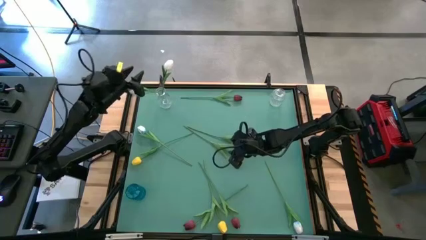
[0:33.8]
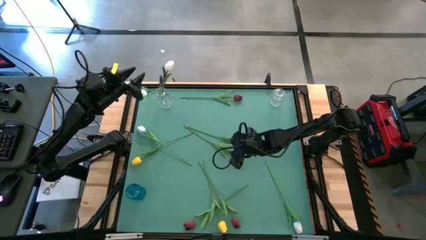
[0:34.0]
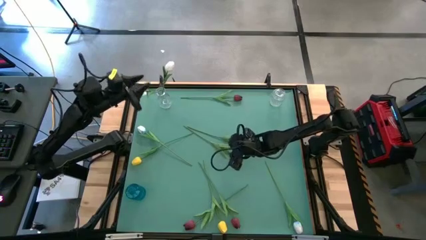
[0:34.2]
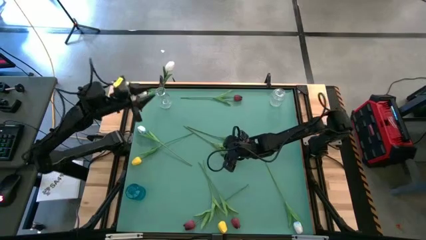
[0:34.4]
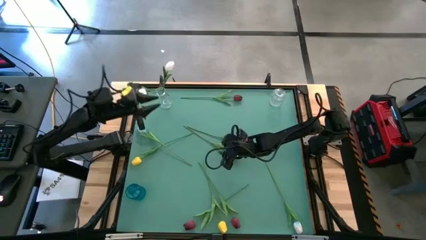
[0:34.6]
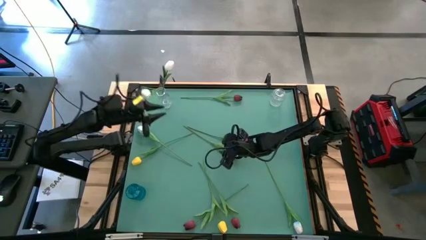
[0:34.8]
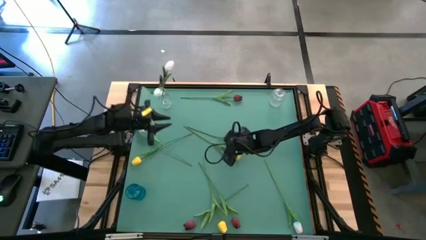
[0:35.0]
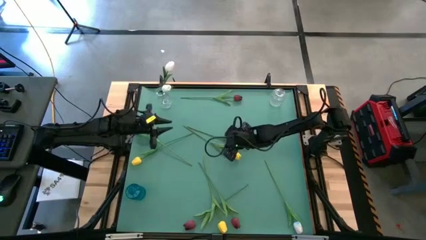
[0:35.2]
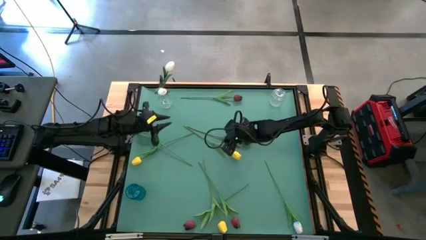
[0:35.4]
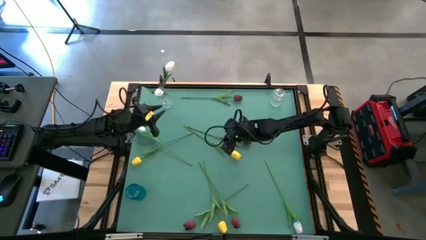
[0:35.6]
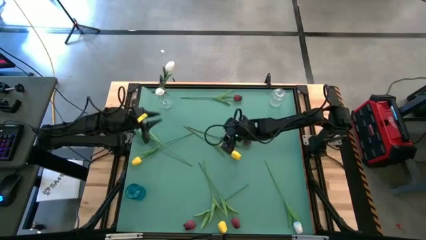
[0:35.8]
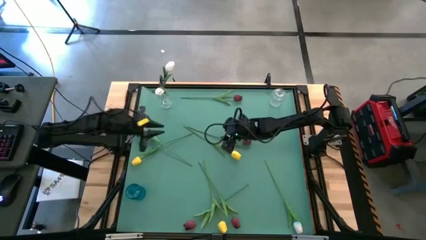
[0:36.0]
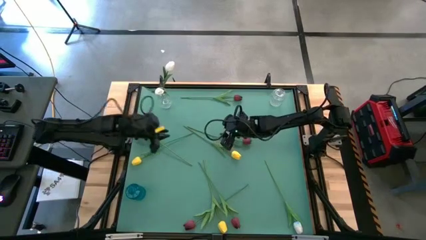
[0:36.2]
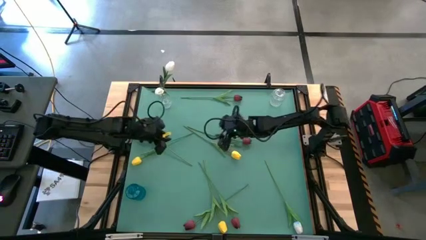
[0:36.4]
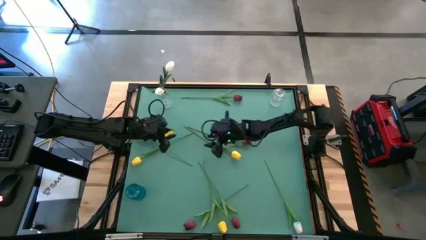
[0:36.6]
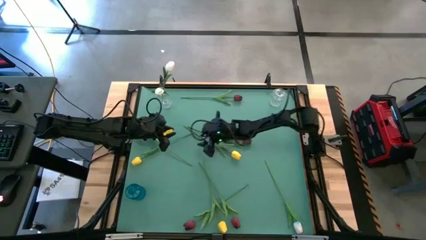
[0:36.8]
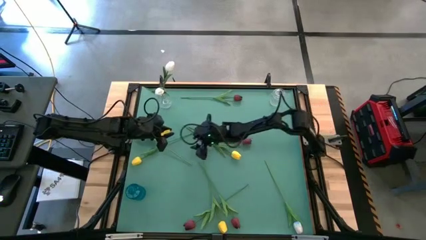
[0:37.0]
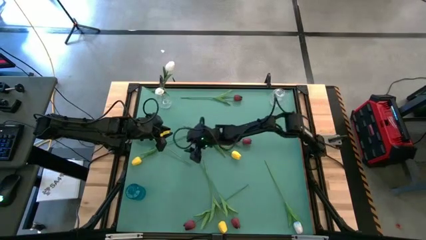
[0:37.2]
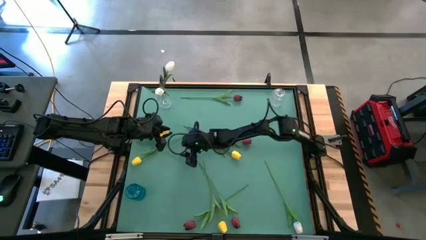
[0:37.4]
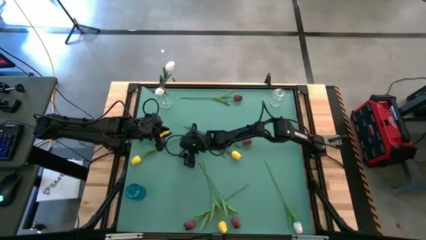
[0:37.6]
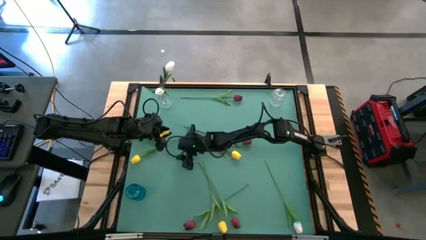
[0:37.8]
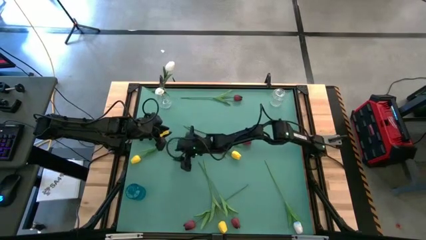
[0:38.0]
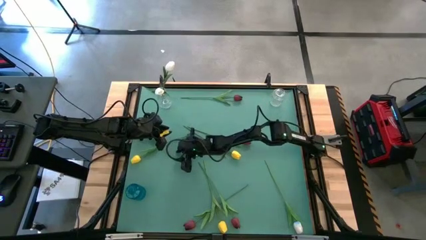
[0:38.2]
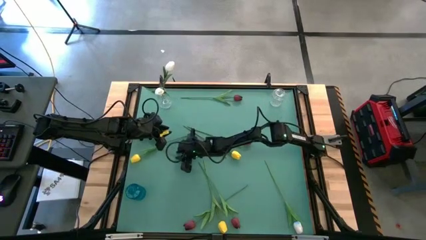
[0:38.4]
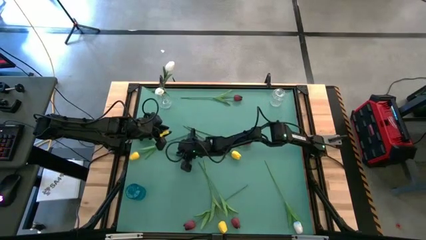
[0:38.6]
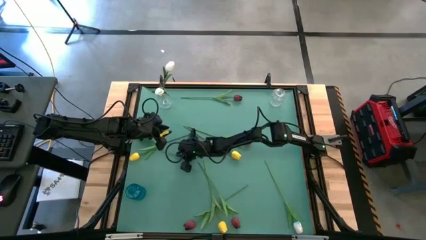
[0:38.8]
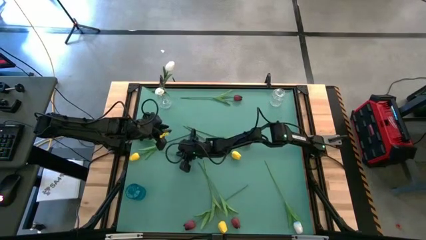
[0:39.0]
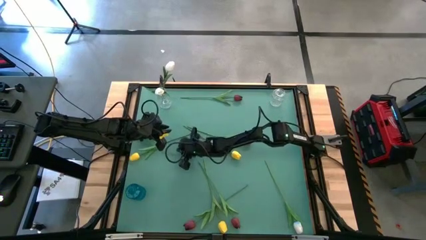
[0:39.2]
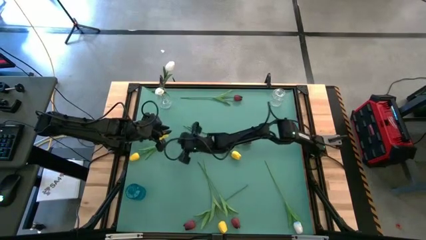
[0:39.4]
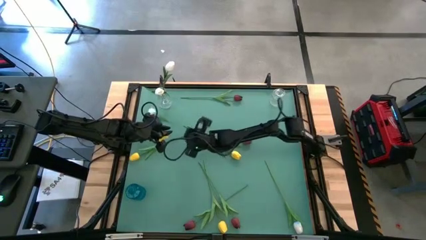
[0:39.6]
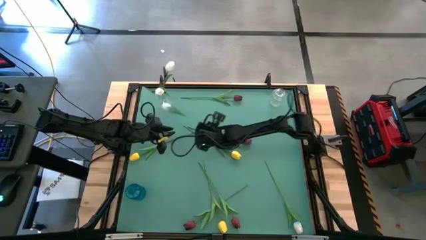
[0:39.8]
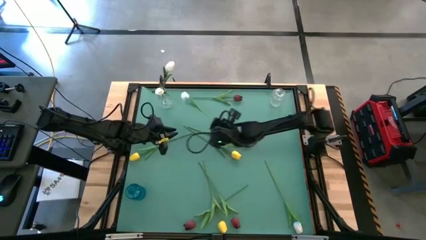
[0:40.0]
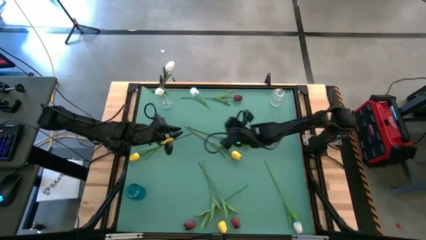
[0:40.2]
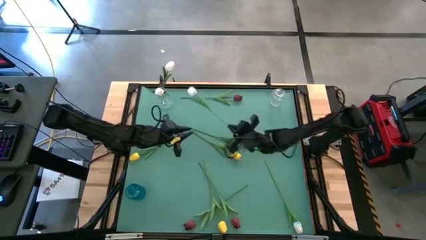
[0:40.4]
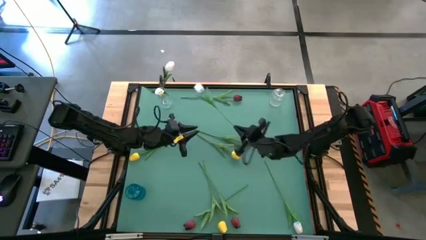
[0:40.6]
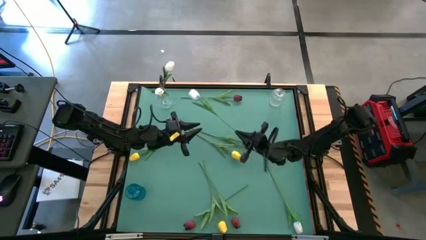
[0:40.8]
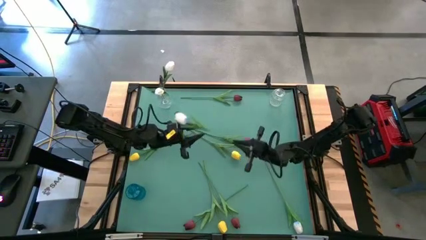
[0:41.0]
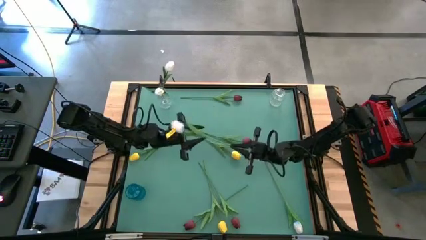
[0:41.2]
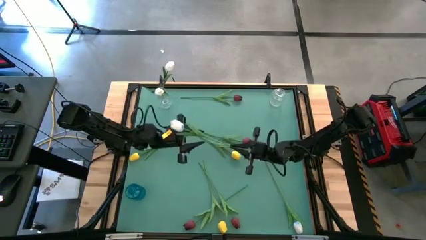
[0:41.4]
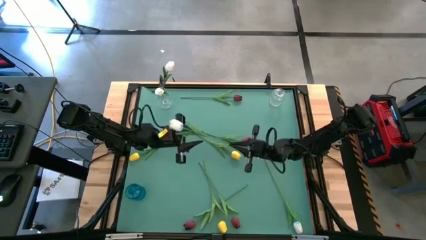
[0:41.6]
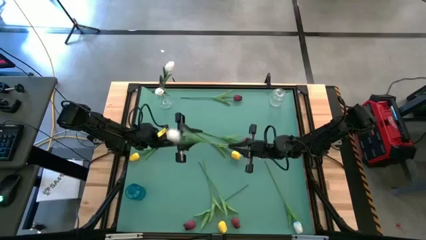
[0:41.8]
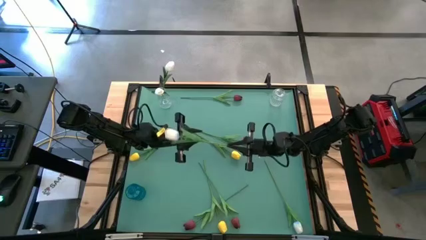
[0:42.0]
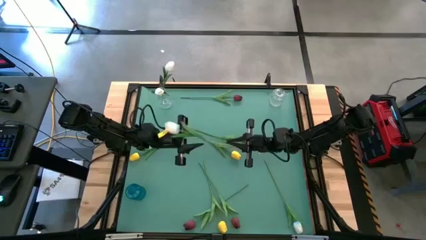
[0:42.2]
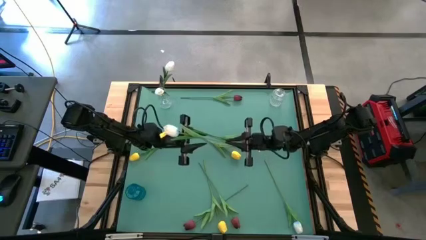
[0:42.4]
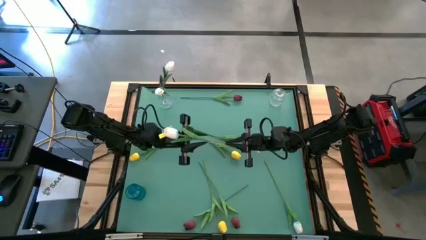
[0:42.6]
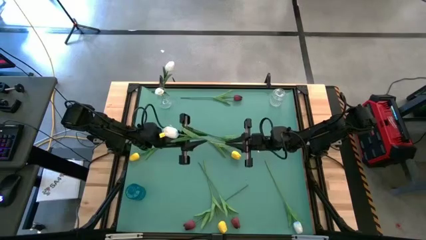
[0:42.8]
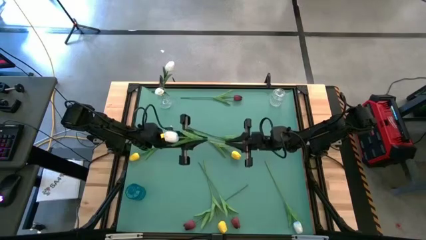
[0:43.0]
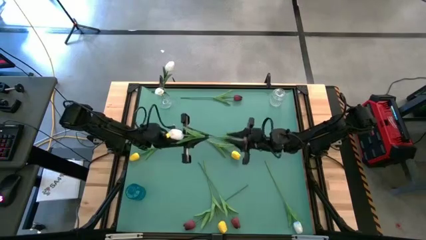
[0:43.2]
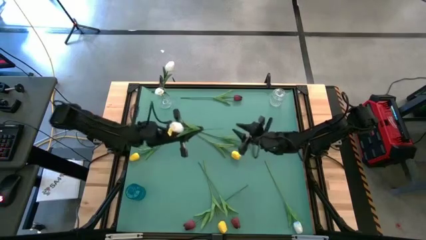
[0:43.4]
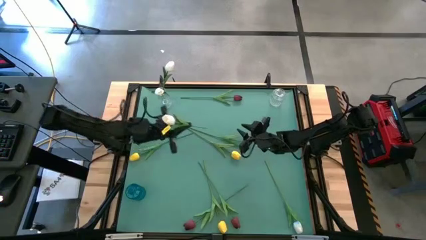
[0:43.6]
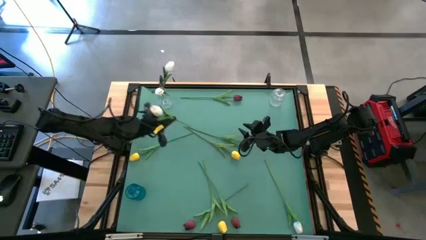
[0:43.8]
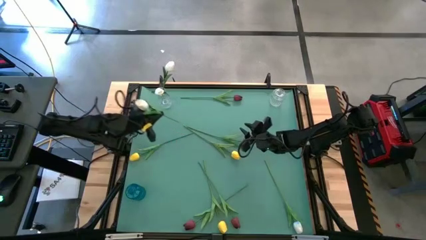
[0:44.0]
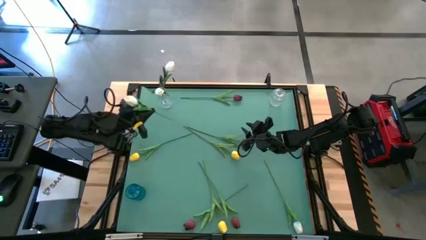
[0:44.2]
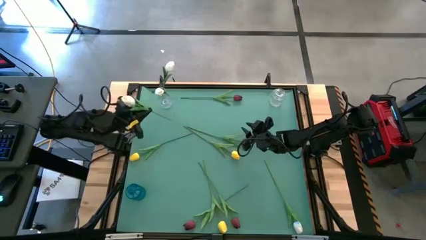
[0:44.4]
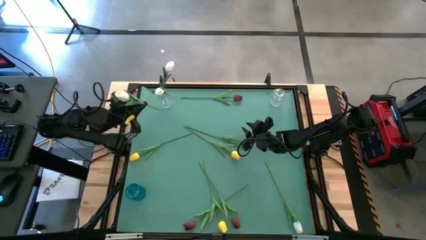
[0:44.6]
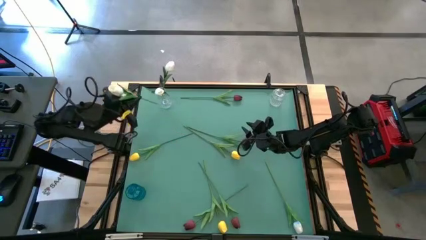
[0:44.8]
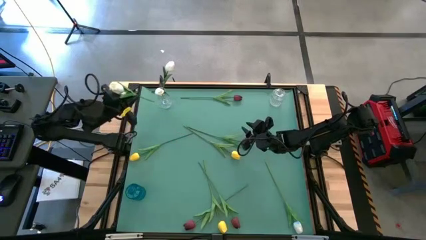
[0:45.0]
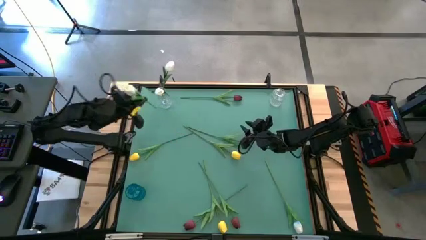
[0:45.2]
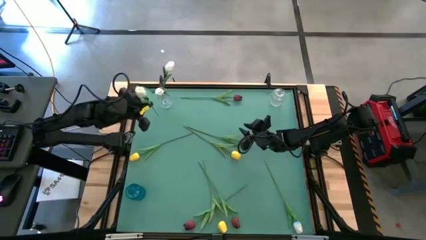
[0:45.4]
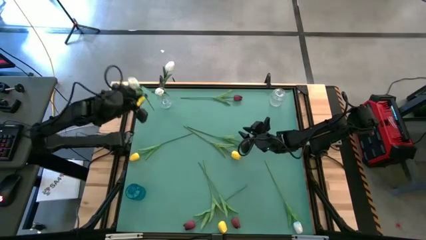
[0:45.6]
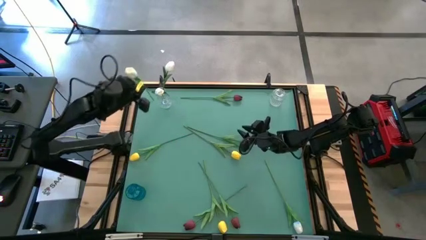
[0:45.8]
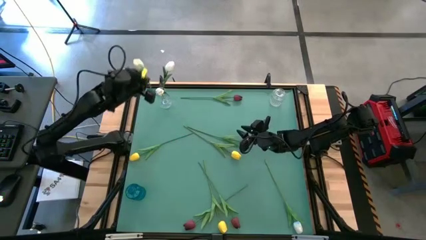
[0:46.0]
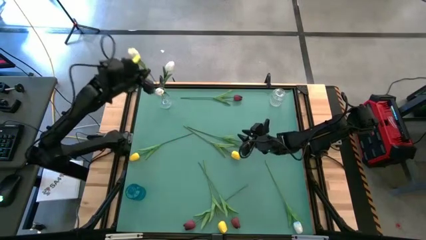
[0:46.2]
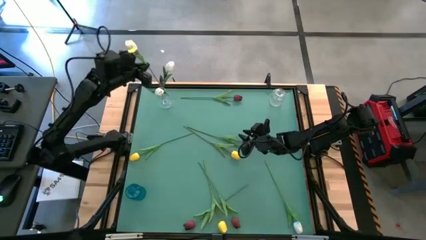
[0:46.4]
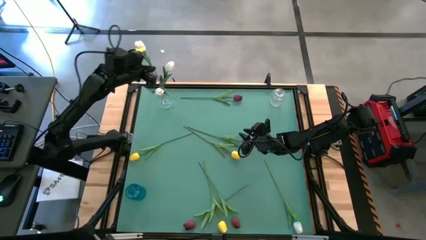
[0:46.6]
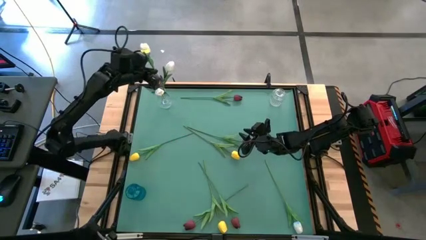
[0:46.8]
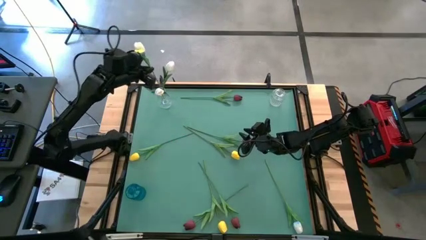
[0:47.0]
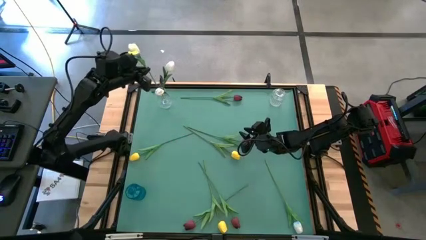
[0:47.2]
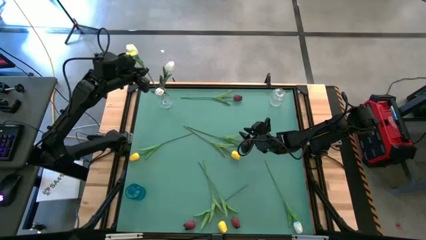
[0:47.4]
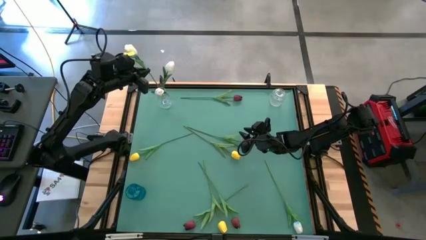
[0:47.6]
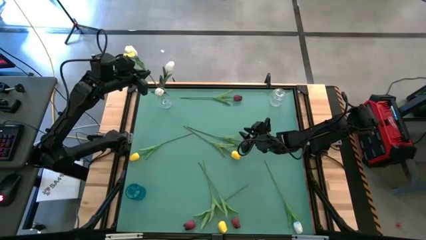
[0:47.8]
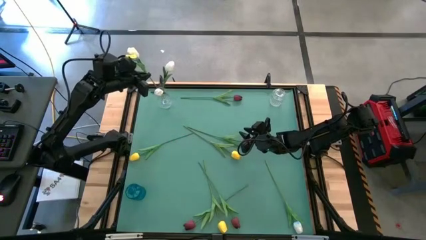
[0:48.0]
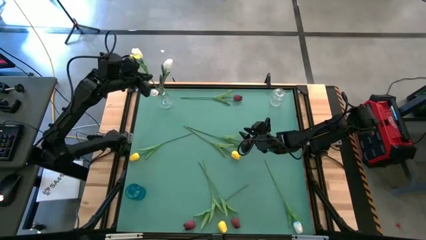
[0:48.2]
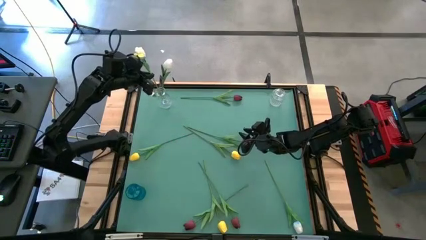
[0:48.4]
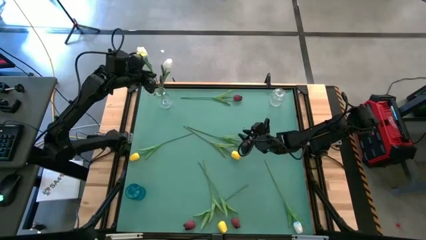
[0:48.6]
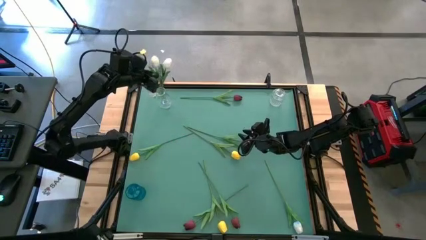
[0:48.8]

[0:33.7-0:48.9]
Task: Sort flowers into vase by color
Put the white flower into the left transparent vase
